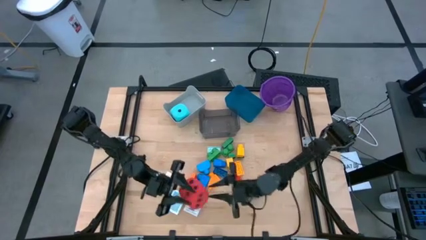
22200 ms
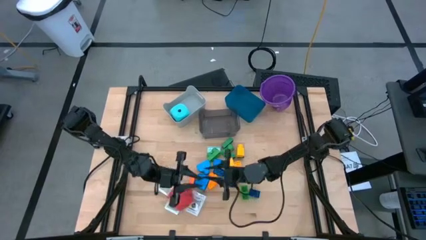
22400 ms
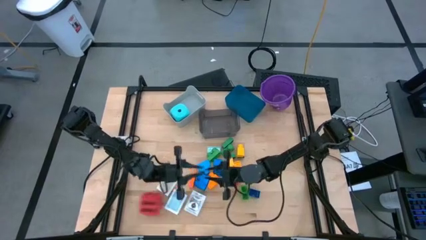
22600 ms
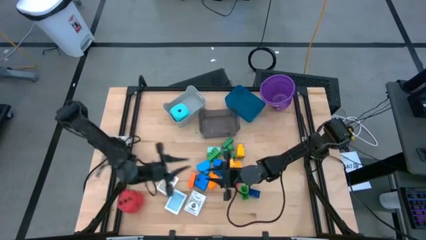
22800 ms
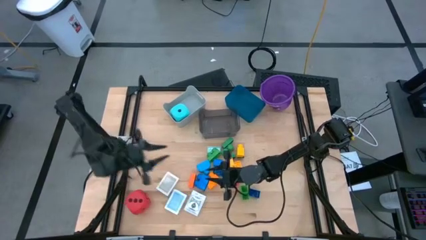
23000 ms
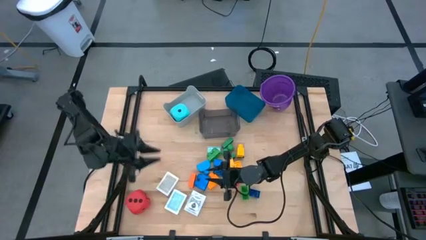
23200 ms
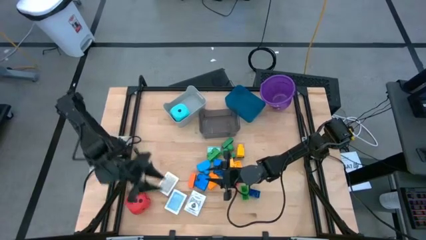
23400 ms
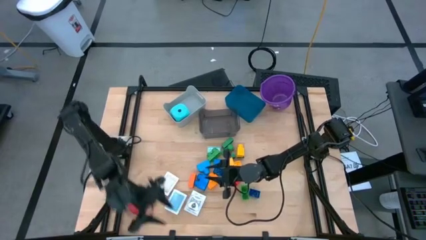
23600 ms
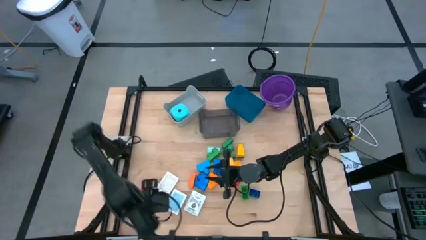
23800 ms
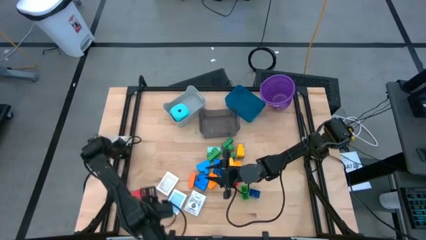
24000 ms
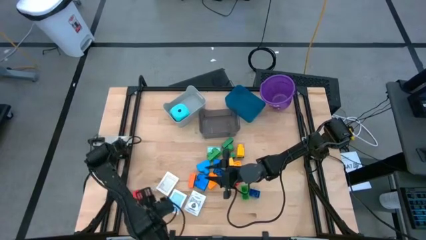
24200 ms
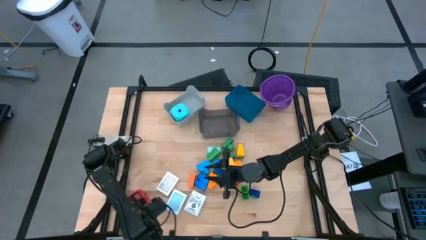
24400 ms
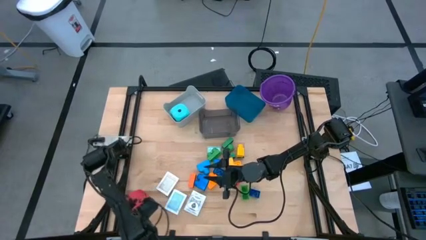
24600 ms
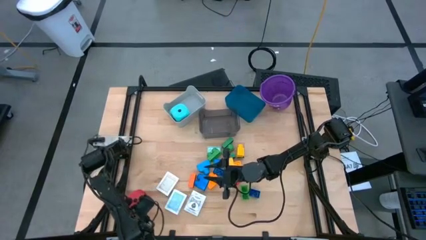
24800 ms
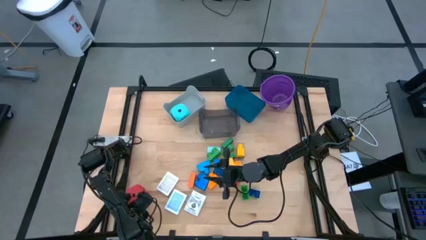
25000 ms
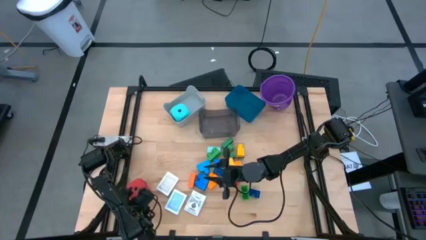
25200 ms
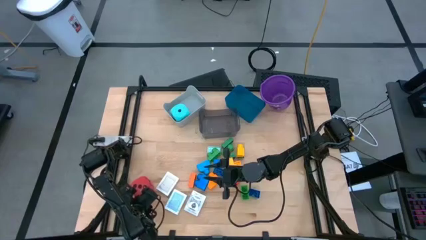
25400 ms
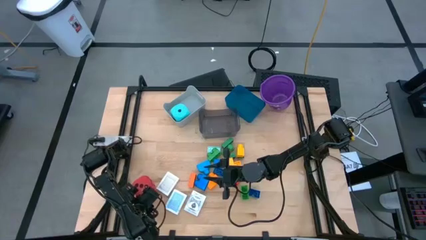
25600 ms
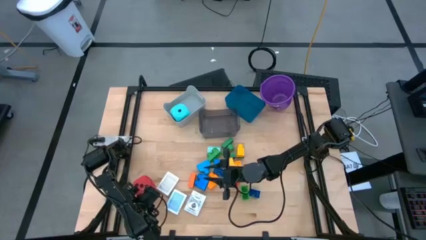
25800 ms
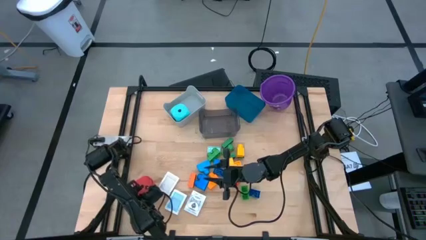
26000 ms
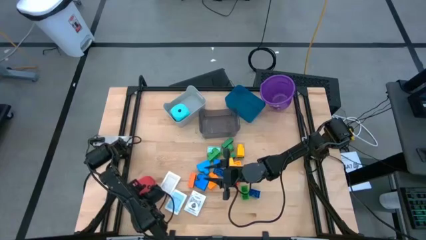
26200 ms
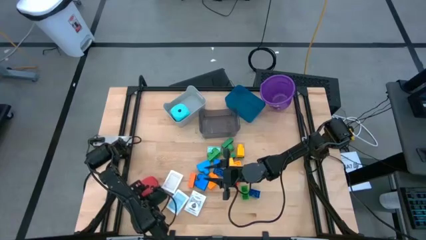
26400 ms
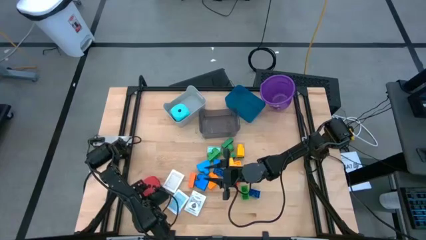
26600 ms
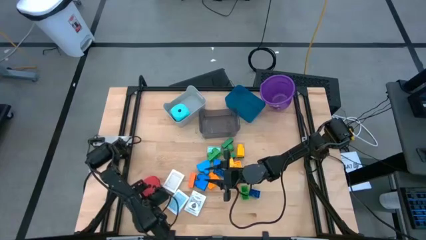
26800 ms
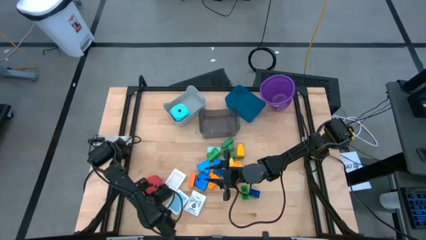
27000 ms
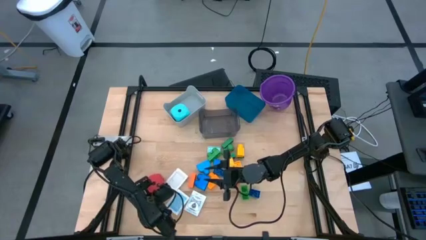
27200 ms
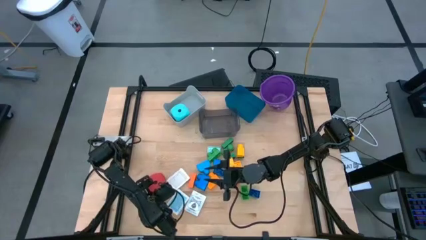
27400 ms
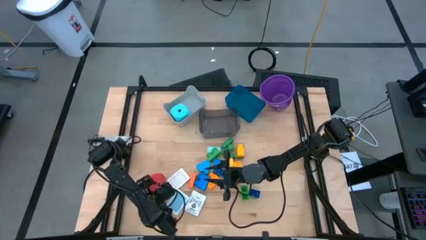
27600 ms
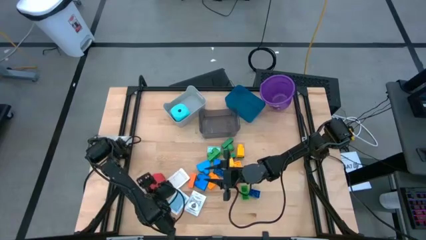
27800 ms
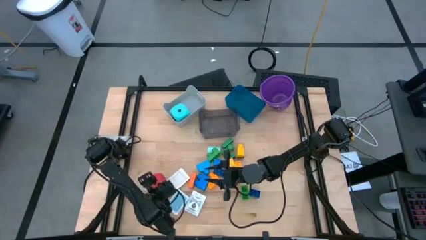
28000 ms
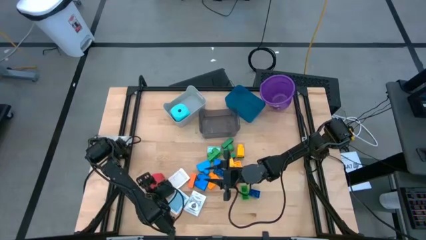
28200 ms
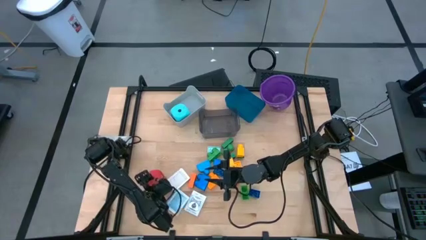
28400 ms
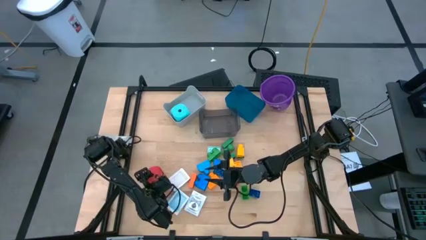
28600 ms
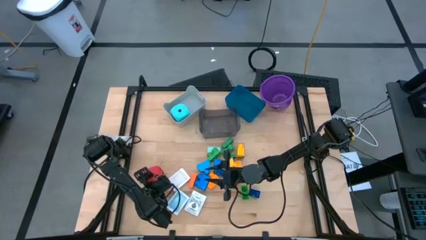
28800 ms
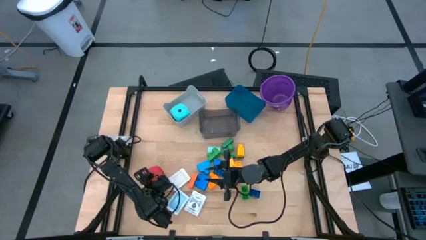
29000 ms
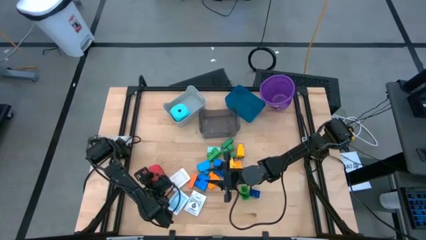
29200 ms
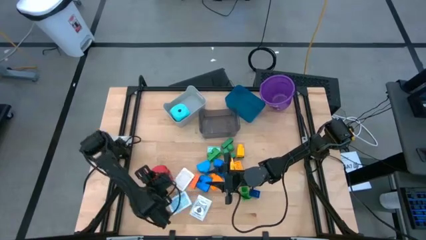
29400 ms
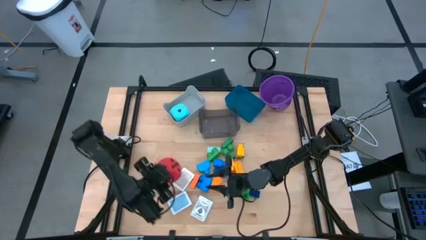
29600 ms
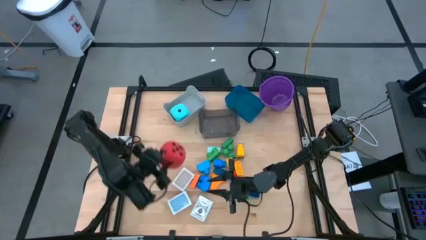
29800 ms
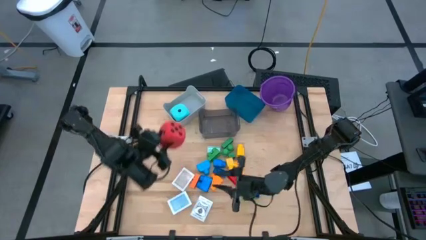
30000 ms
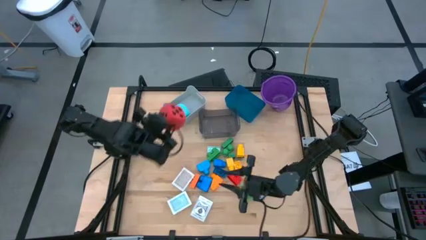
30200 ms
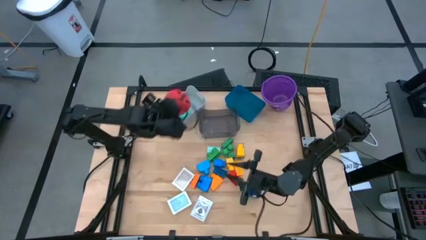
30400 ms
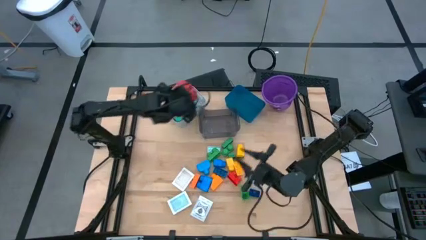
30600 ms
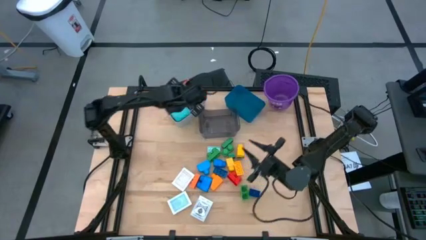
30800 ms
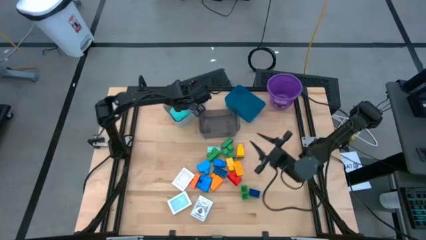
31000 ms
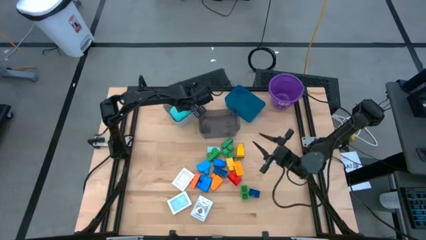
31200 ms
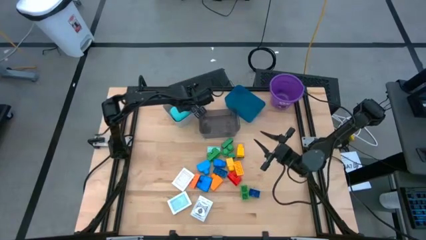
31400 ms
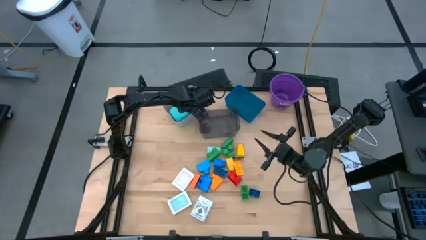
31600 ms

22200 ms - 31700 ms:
Task: Pick & Place Toys
Put the red die into the gray bin

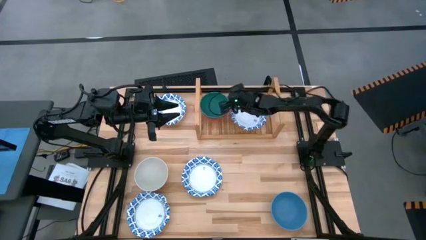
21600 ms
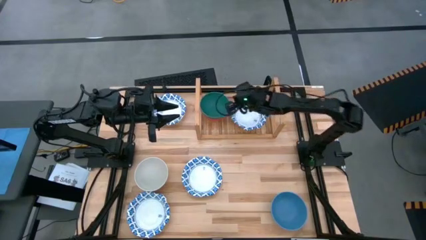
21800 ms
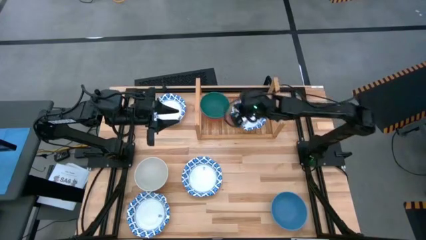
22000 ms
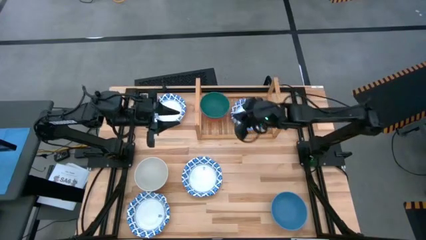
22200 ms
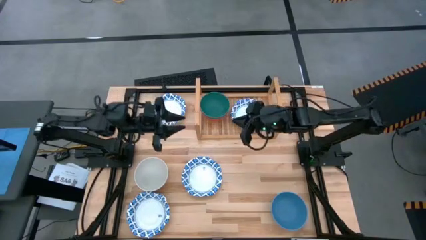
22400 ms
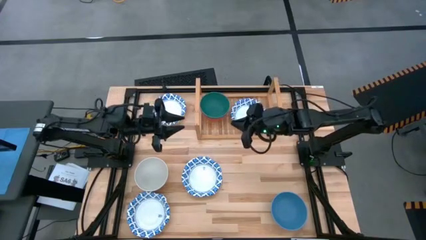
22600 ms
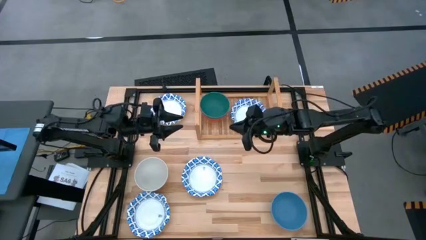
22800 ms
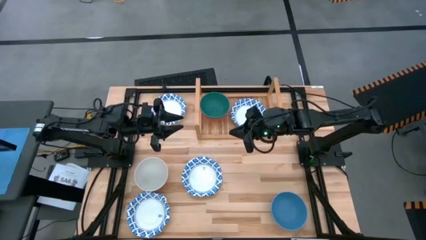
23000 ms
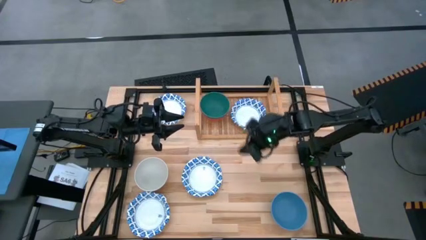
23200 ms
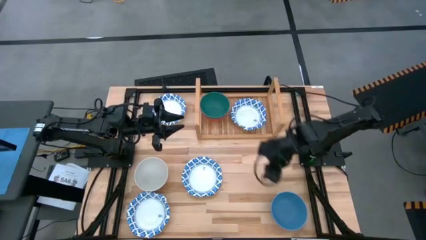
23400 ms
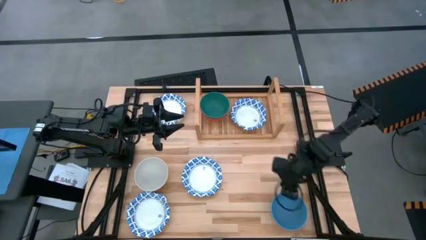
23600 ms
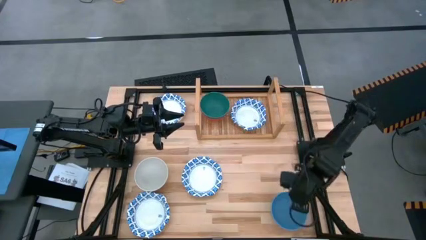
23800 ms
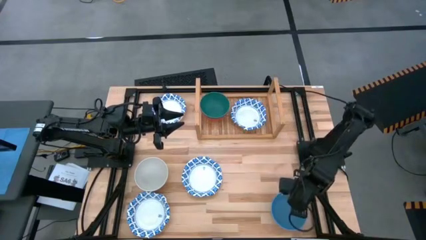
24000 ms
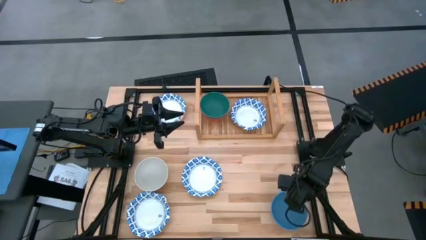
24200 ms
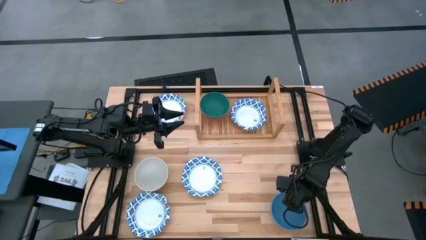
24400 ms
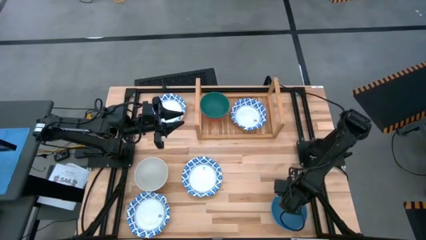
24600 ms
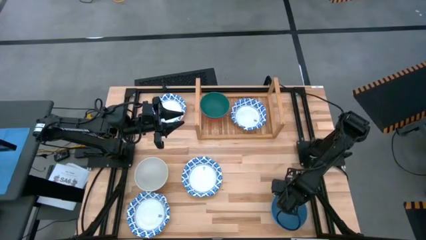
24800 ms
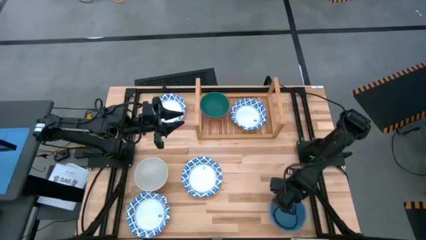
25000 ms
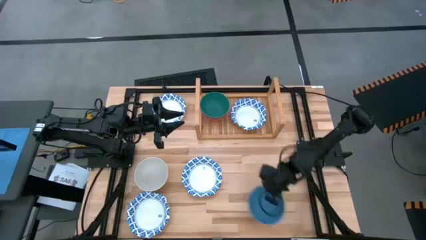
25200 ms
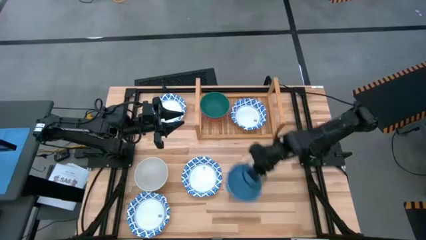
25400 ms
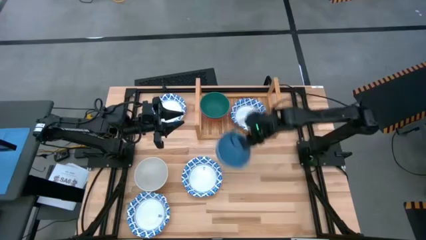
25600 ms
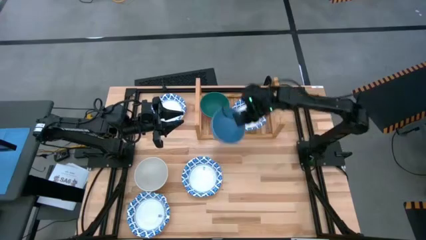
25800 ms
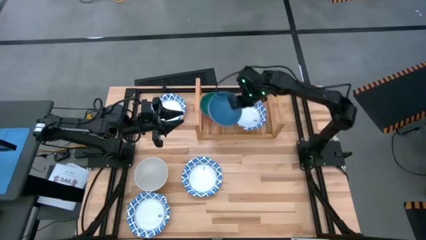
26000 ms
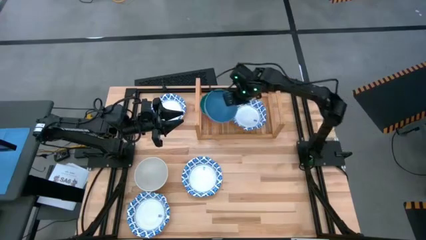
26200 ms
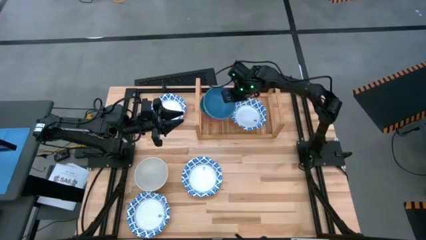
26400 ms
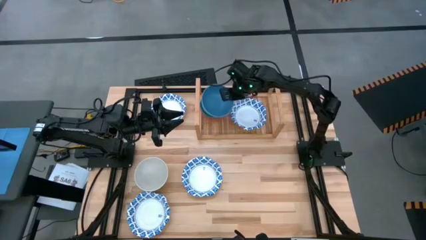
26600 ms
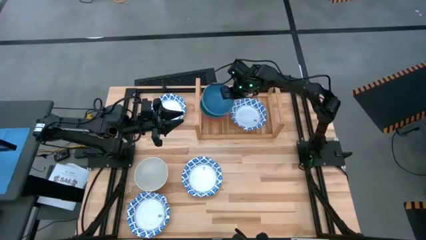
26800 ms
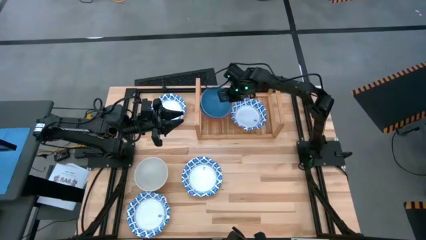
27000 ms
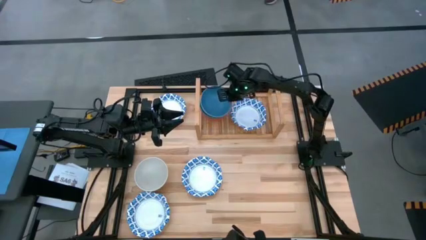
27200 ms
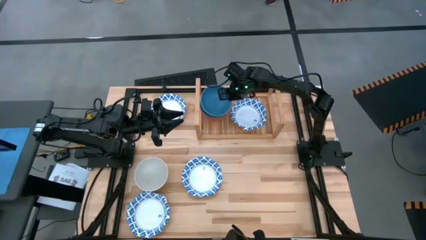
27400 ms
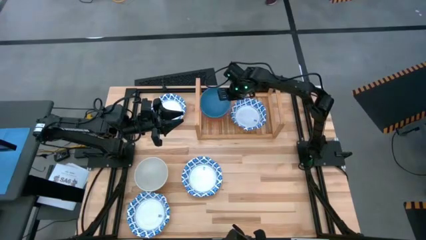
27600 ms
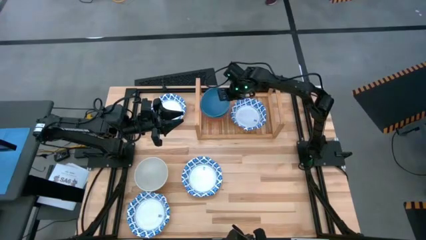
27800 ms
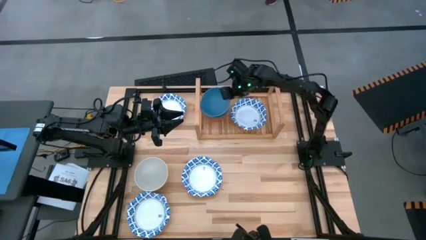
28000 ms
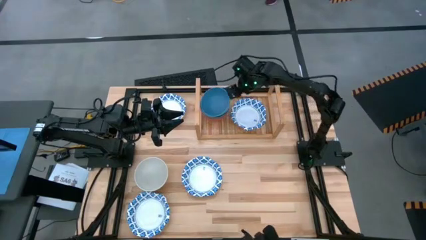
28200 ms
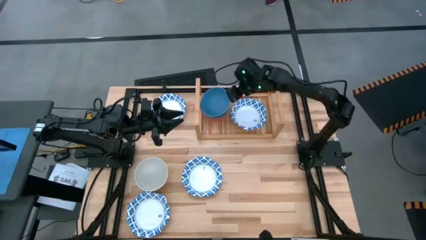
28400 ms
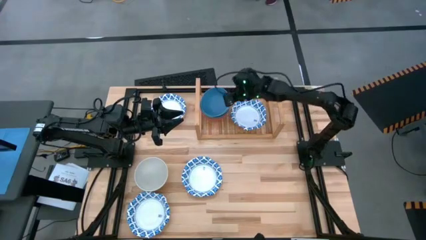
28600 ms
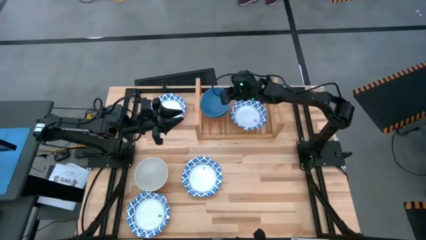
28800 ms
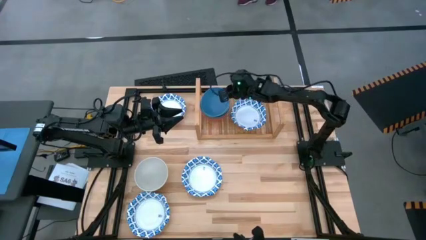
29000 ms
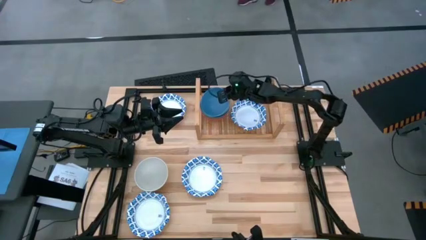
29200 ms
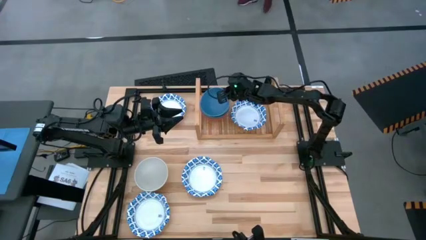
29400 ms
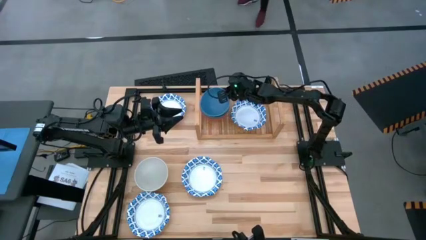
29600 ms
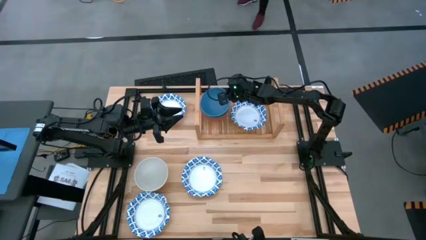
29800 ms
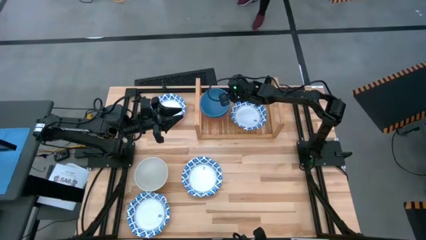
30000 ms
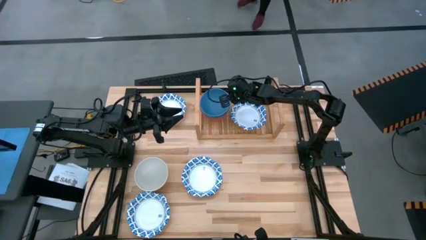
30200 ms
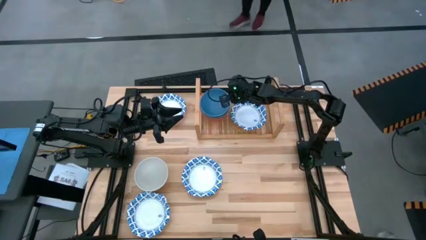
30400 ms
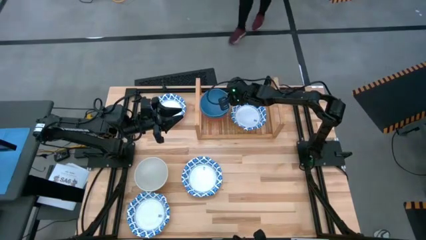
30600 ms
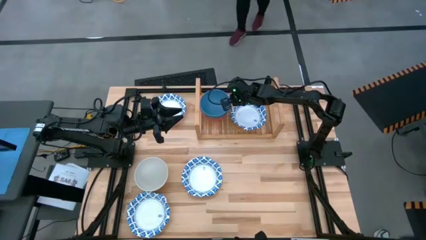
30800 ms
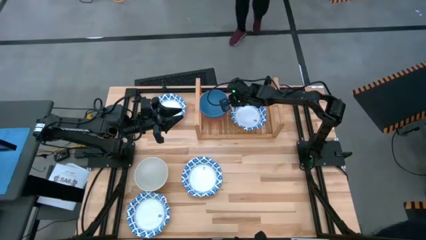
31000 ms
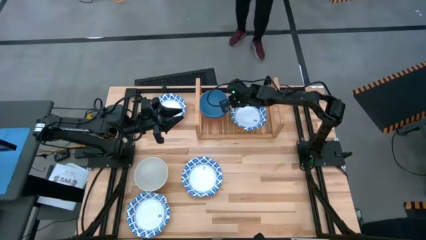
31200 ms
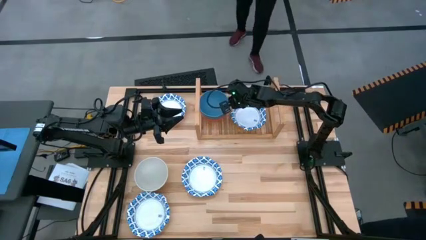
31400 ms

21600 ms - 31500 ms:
Task: Place and stack bowls onto a shelf
Stack the blue bowl on top of the green bowl on the shelf
